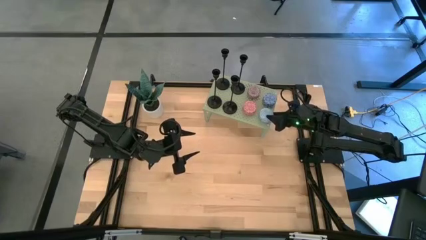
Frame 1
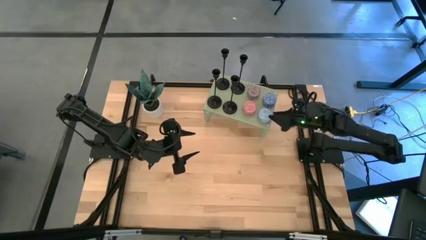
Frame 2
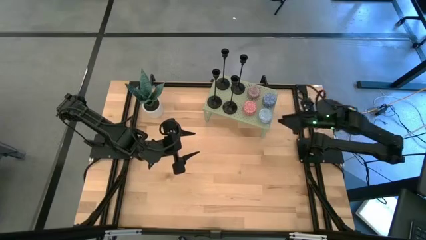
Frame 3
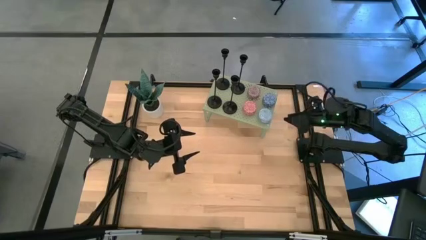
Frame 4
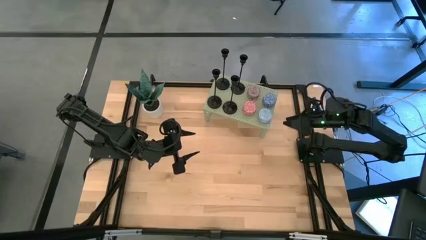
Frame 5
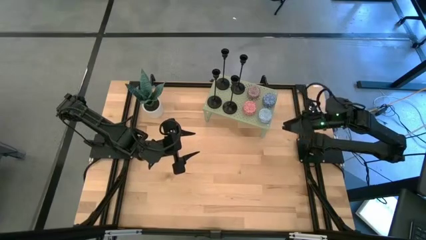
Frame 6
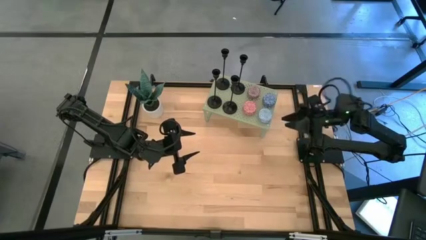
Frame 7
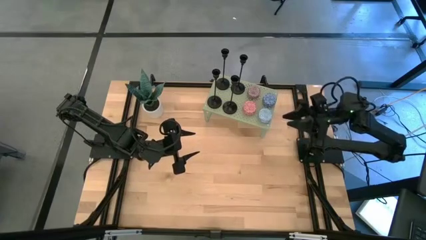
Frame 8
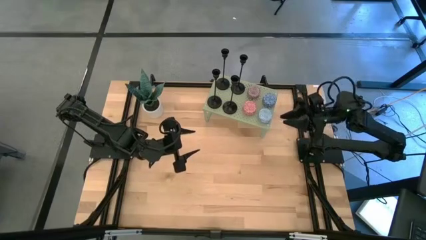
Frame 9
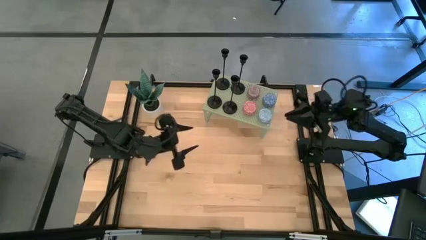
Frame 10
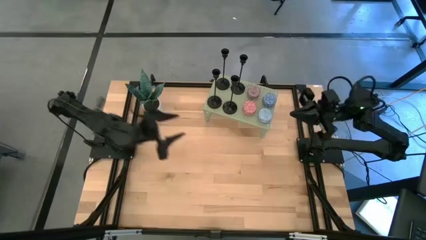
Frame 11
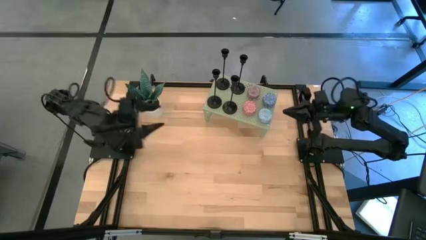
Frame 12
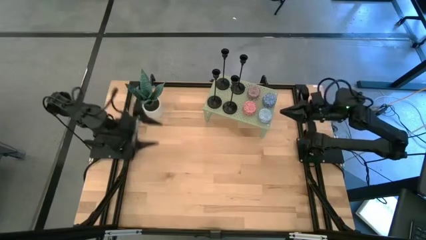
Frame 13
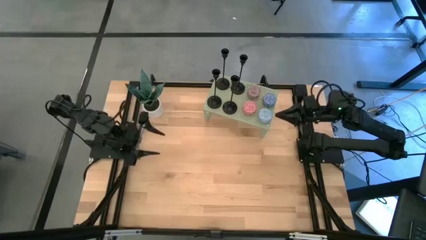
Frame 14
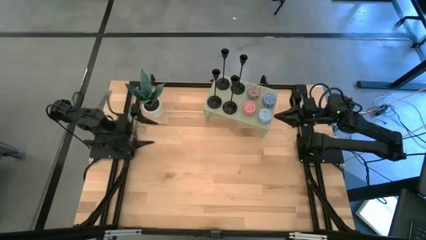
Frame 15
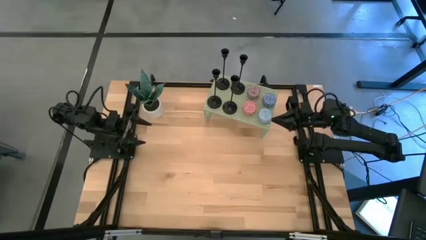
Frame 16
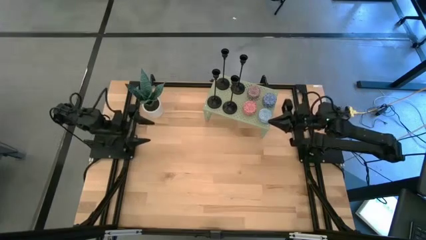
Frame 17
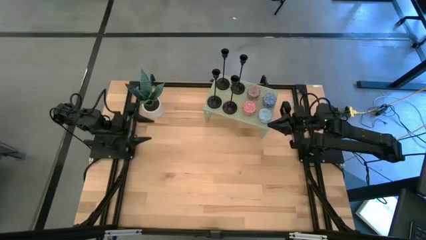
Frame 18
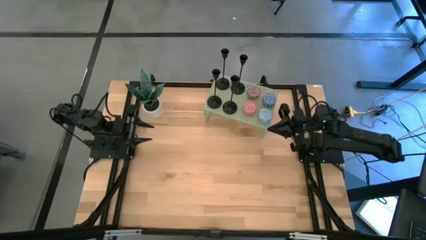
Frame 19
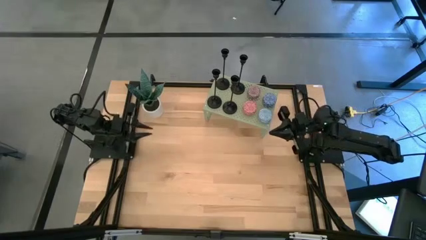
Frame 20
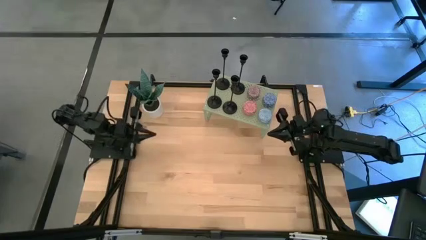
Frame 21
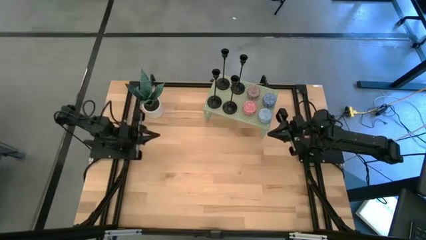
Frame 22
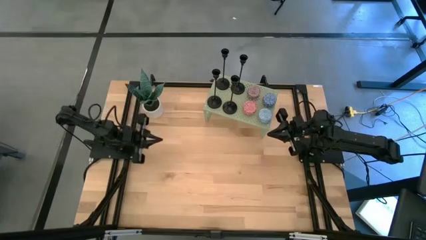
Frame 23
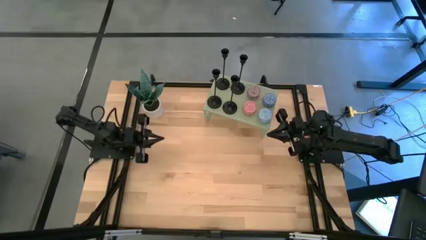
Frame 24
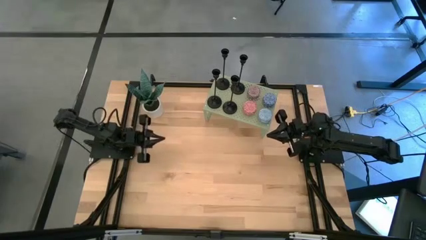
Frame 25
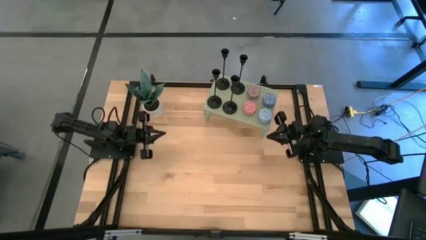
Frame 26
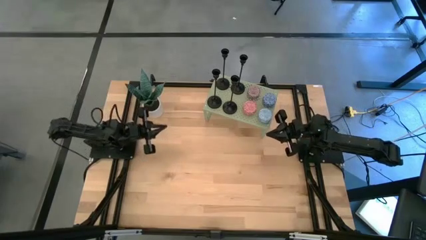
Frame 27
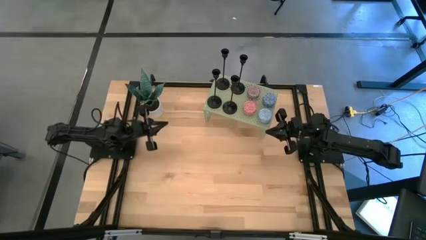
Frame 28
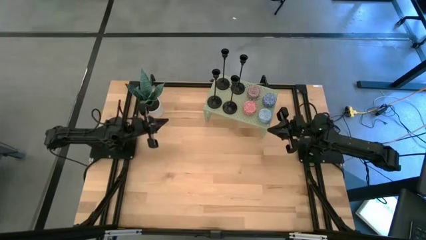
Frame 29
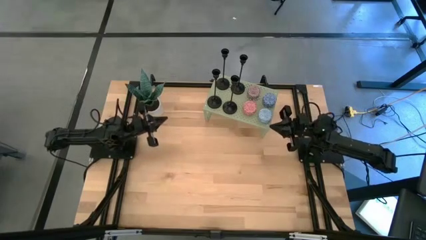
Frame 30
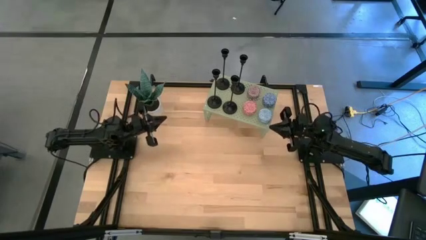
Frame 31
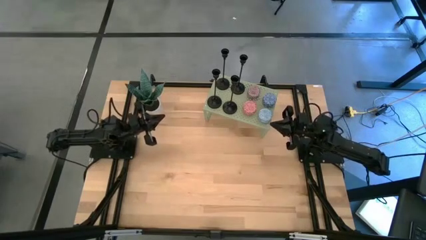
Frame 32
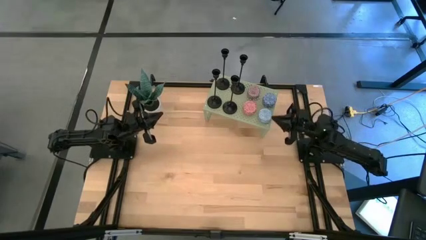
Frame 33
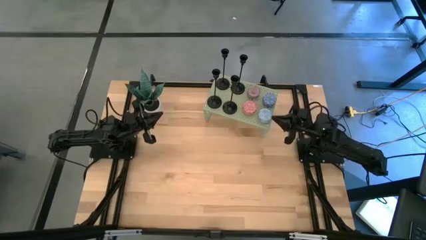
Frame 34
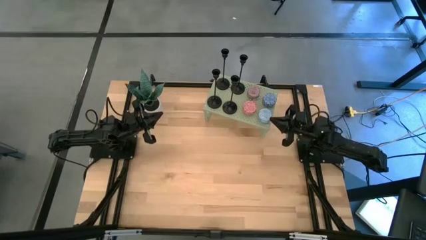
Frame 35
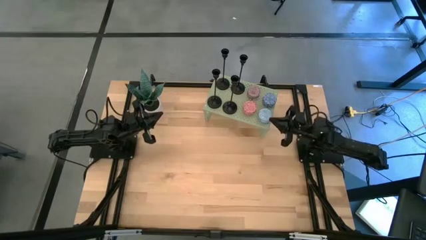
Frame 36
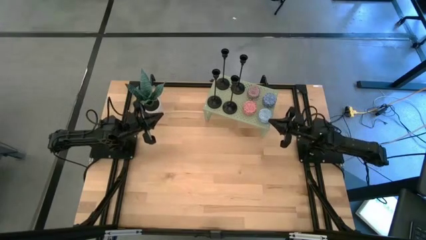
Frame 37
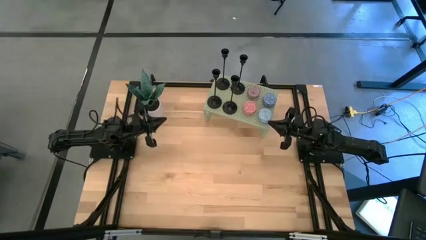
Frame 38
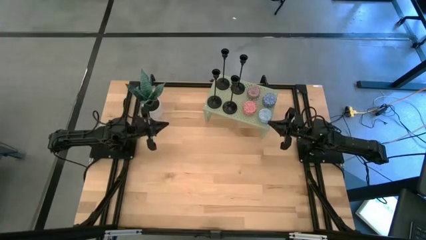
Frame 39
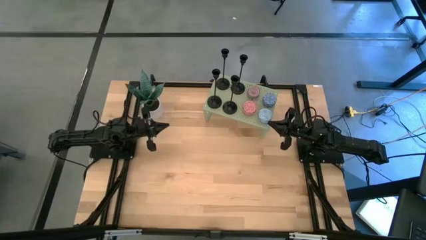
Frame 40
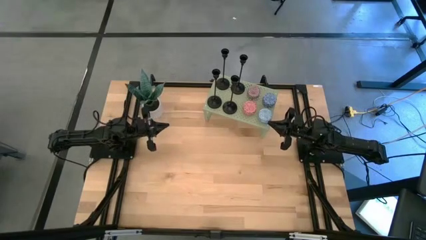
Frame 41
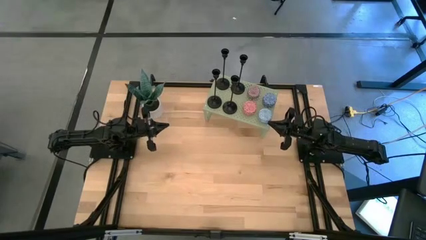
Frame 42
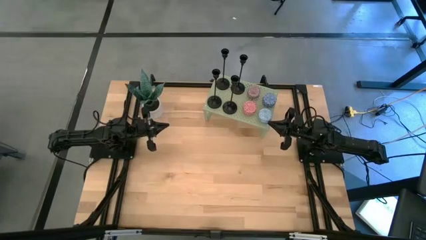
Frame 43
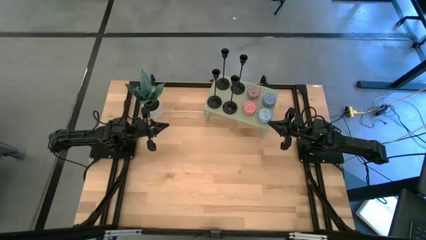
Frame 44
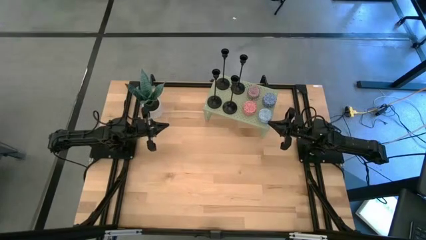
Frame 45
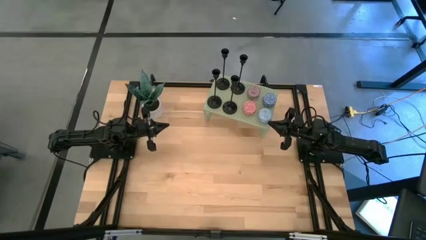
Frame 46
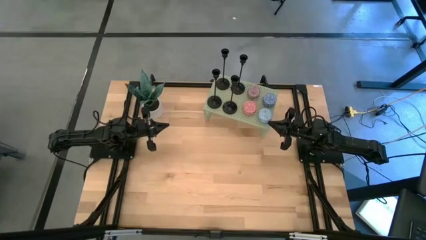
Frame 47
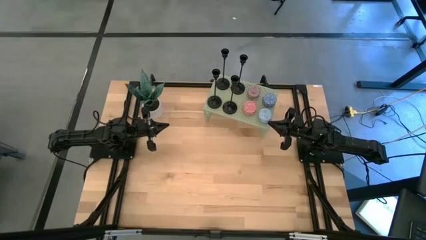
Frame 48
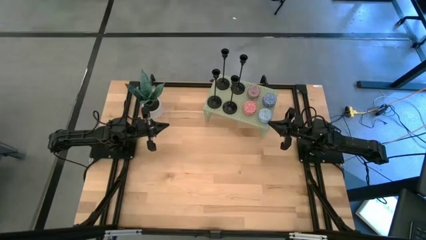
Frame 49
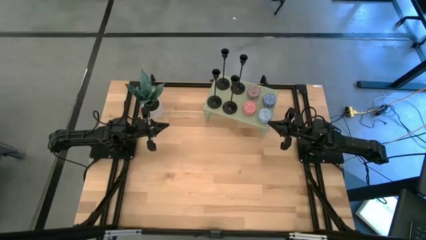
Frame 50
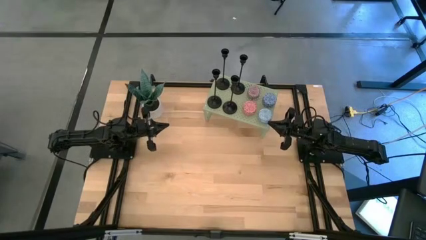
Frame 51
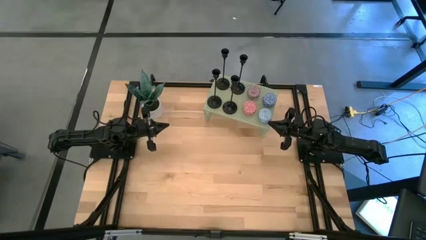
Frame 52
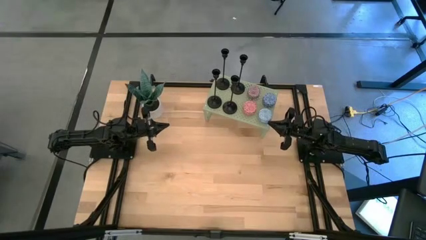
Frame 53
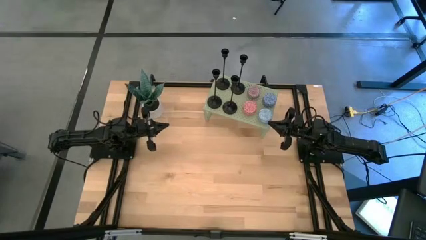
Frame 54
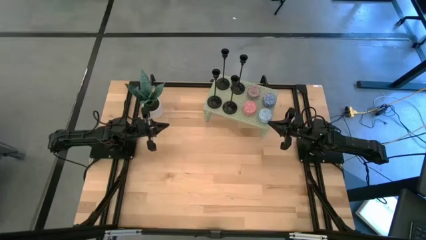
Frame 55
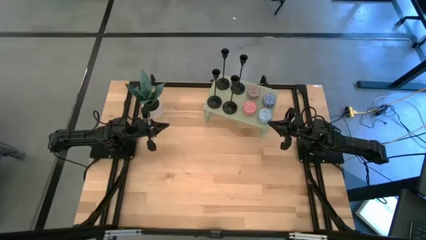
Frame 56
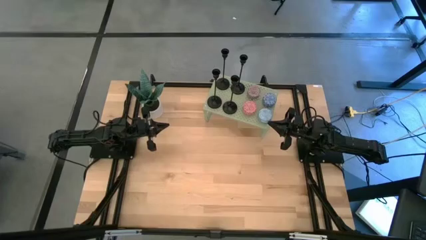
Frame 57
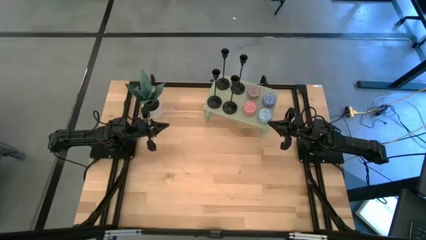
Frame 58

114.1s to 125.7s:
Task: Pick & Place candle stick holders
Return to Home Position

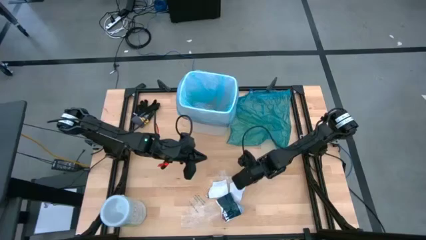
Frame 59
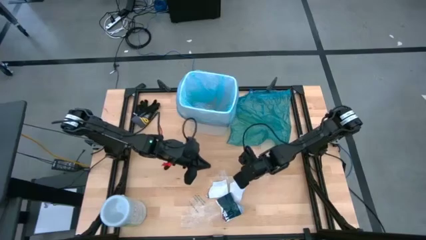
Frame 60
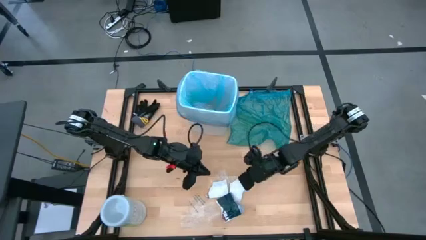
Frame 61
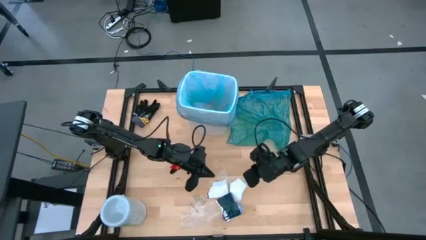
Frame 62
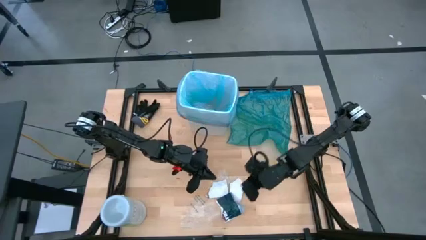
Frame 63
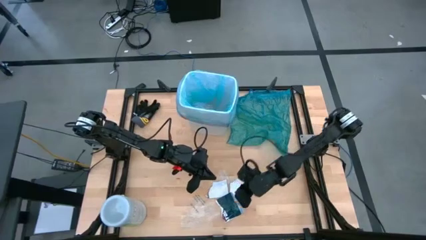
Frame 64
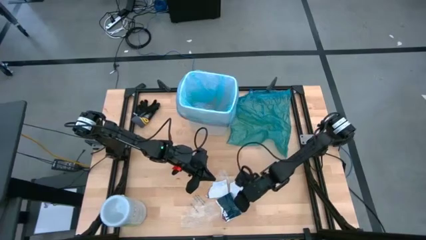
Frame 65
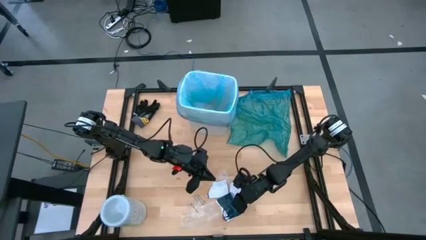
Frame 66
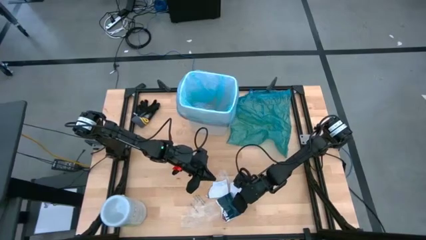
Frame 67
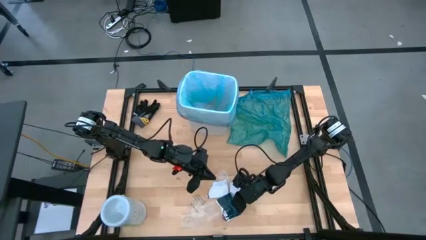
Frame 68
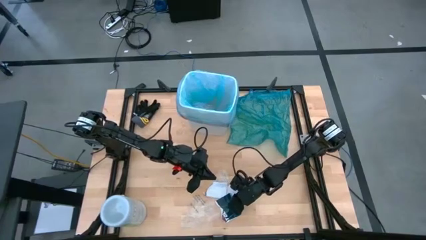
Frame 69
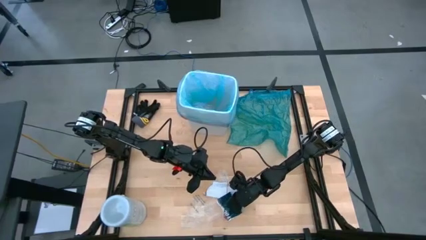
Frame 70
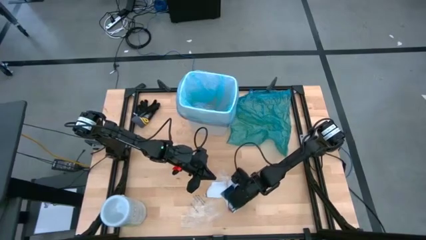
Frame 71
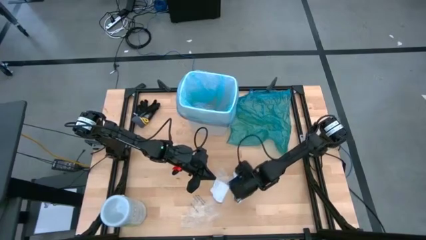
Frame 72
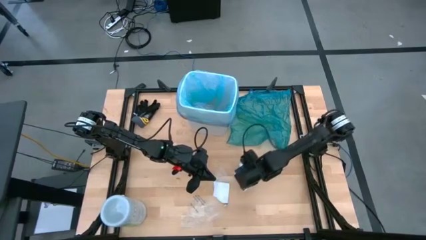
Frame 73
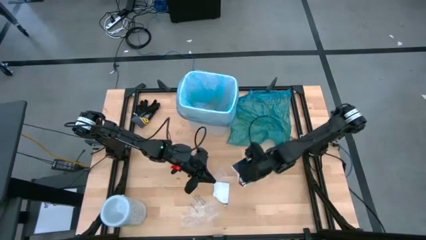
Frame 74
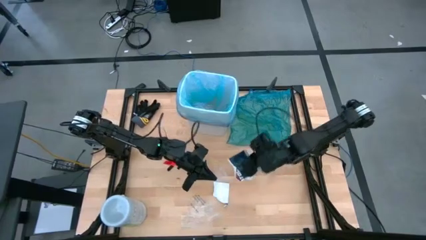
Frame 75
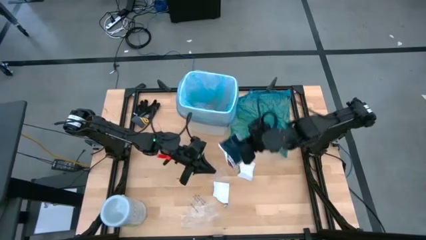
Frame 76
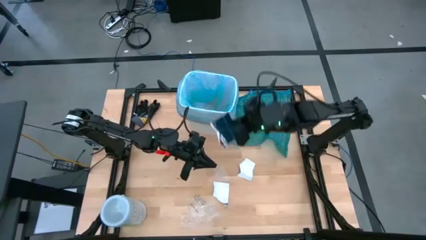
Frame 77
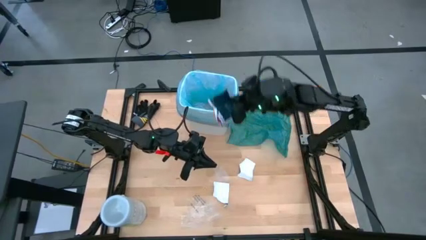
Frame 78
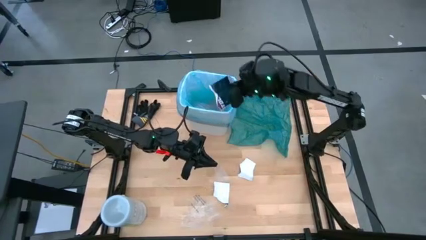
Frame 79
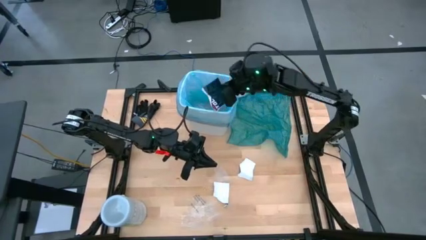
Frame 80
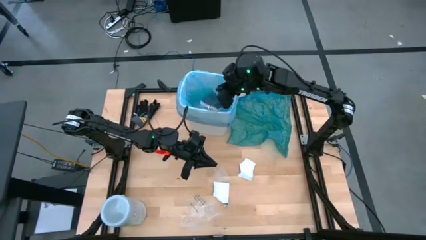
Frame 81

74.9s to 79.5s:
Task: place trash/remove bag and relplace
Put the black magazine paper into the trash bin
